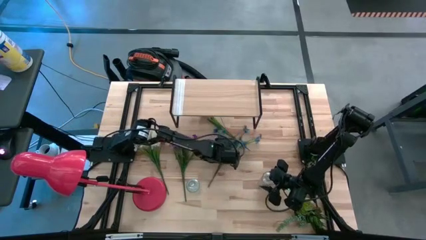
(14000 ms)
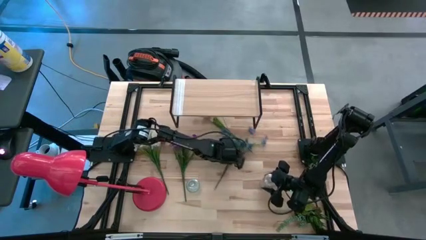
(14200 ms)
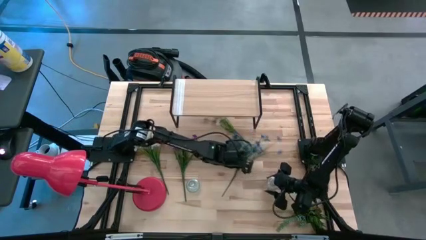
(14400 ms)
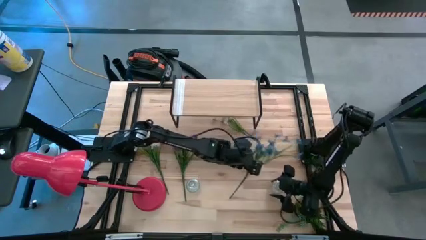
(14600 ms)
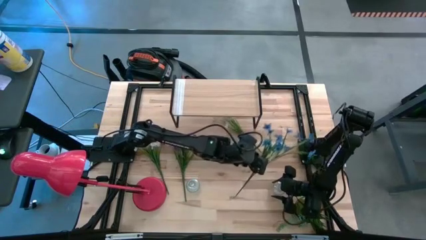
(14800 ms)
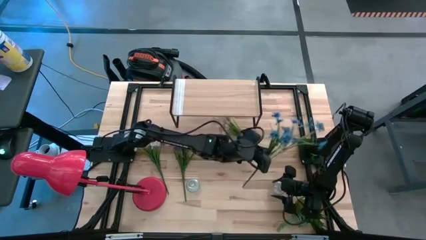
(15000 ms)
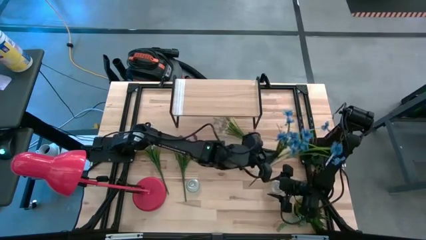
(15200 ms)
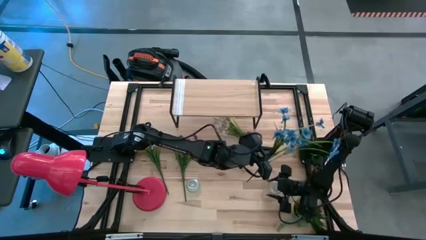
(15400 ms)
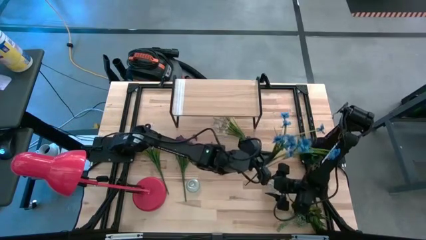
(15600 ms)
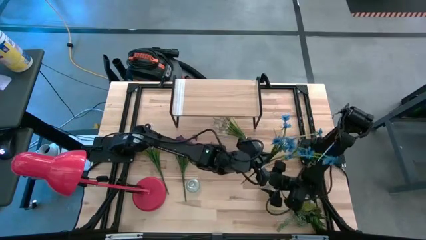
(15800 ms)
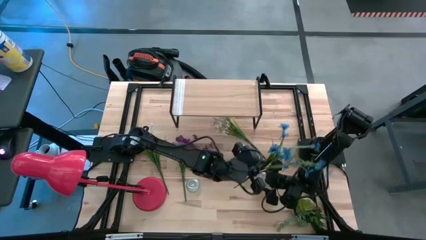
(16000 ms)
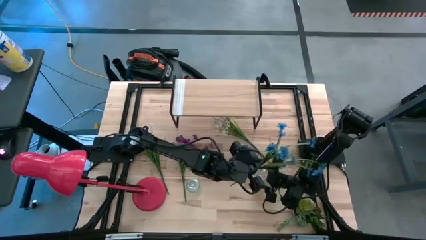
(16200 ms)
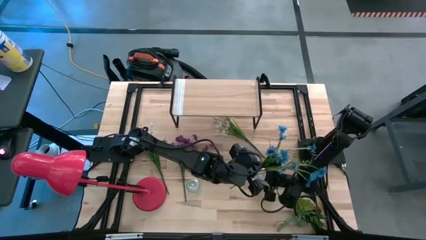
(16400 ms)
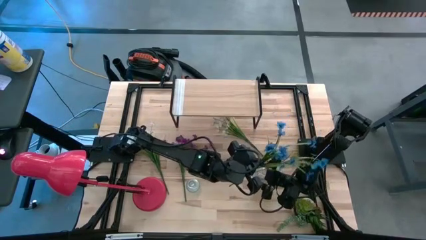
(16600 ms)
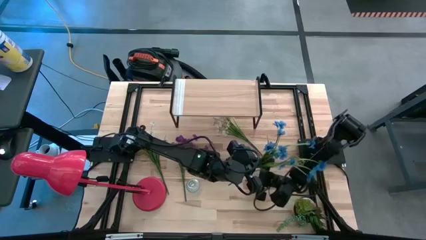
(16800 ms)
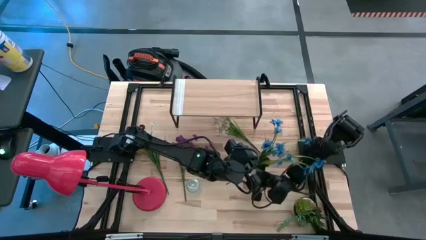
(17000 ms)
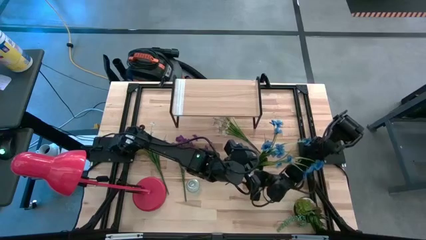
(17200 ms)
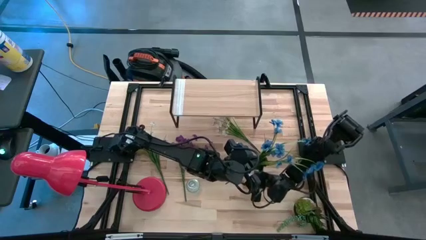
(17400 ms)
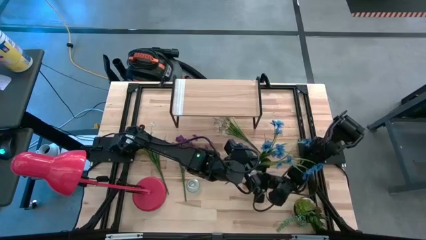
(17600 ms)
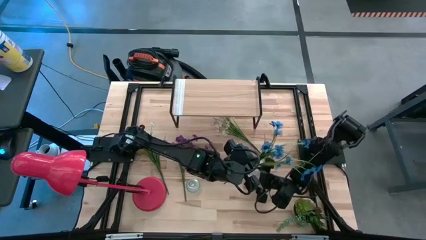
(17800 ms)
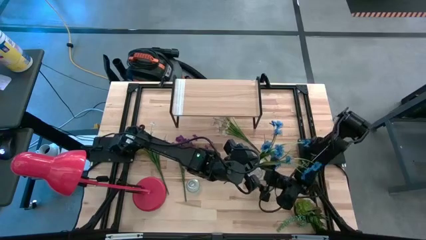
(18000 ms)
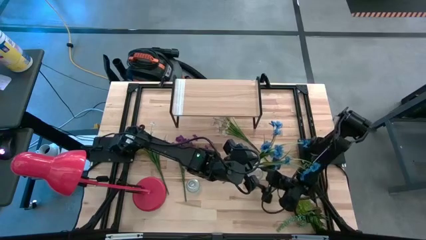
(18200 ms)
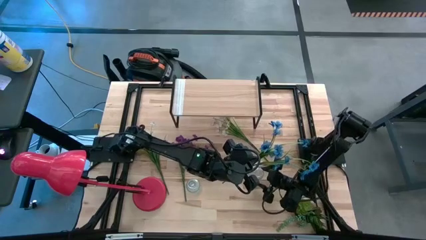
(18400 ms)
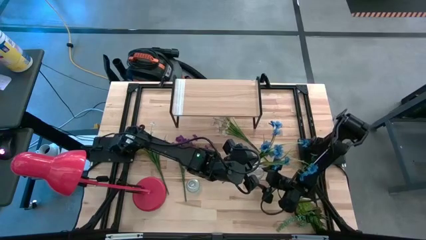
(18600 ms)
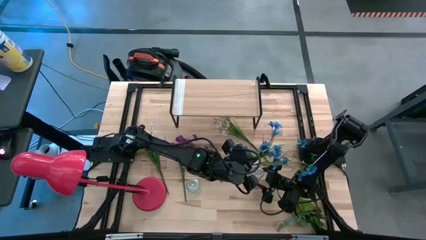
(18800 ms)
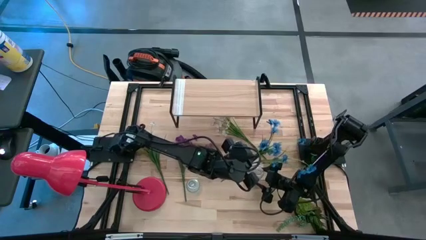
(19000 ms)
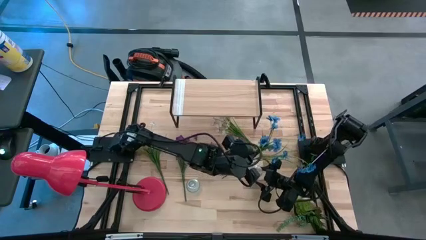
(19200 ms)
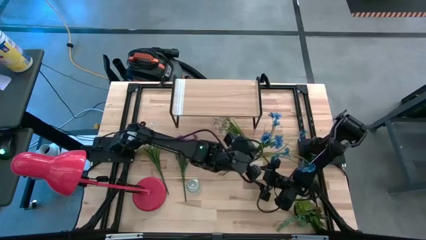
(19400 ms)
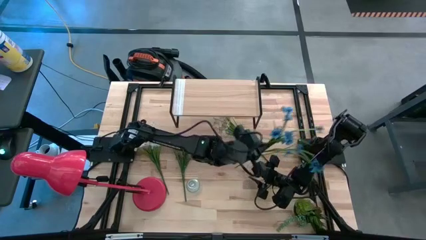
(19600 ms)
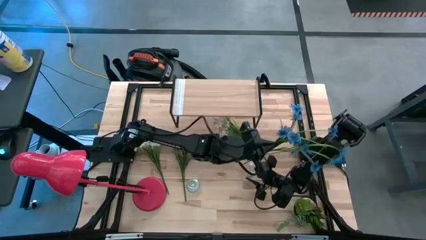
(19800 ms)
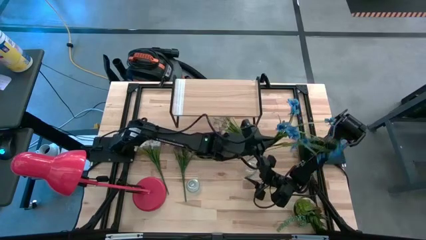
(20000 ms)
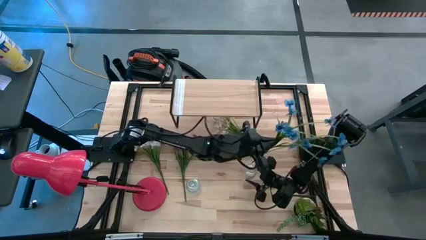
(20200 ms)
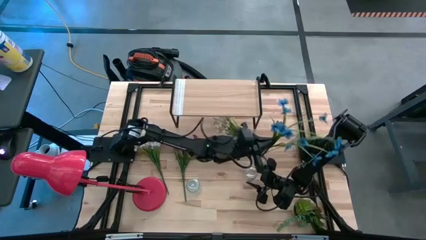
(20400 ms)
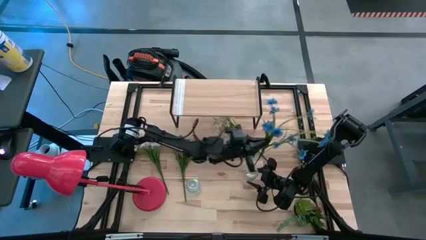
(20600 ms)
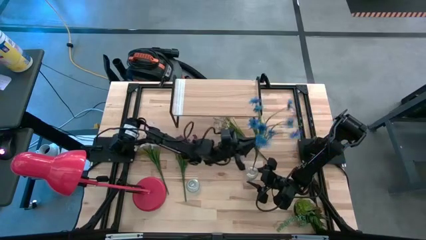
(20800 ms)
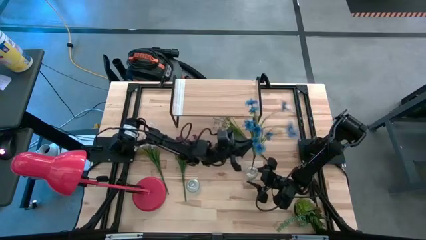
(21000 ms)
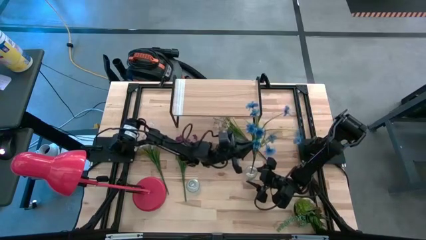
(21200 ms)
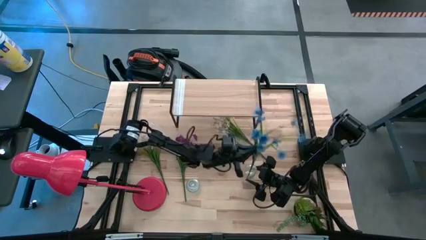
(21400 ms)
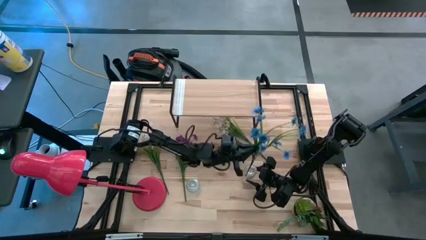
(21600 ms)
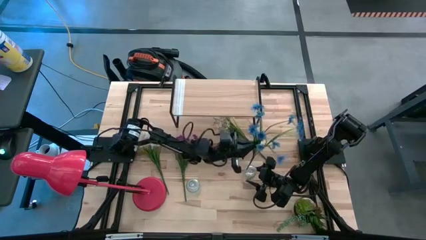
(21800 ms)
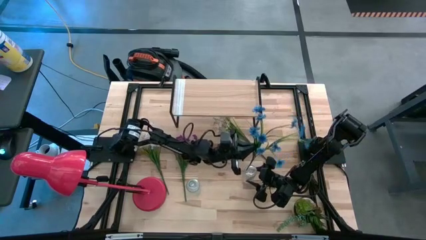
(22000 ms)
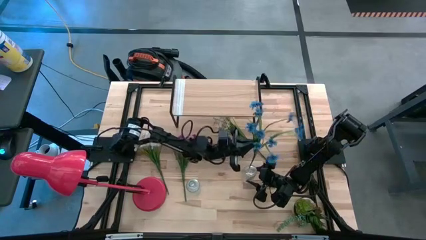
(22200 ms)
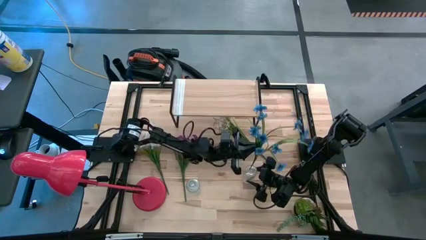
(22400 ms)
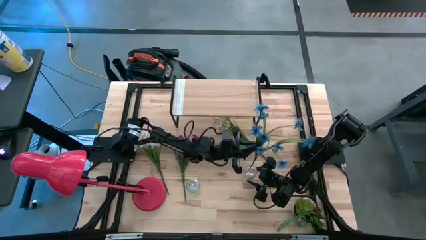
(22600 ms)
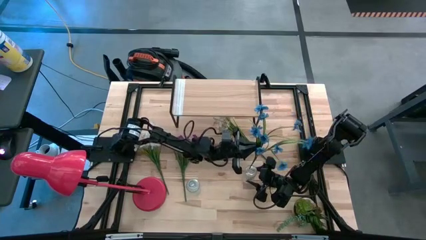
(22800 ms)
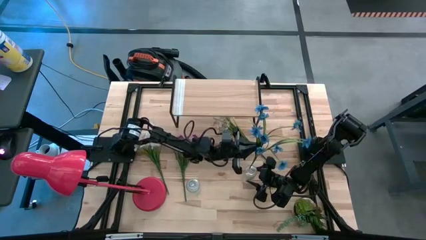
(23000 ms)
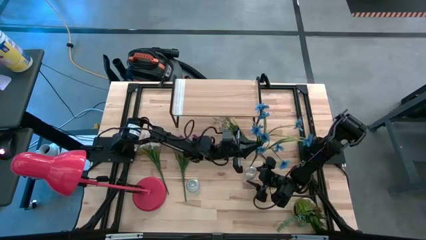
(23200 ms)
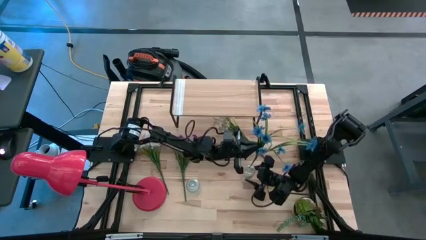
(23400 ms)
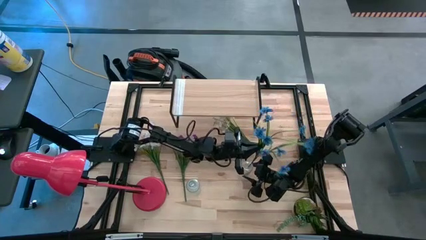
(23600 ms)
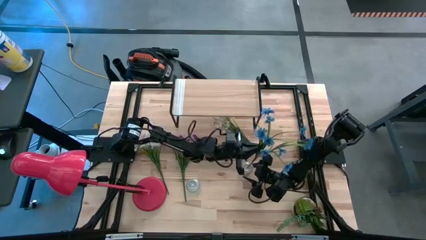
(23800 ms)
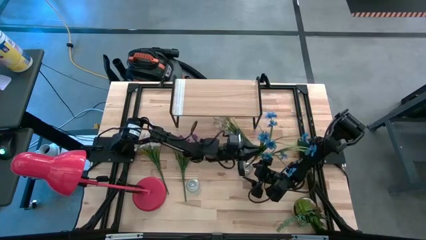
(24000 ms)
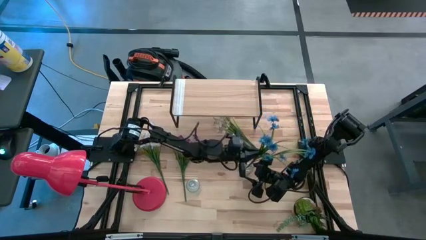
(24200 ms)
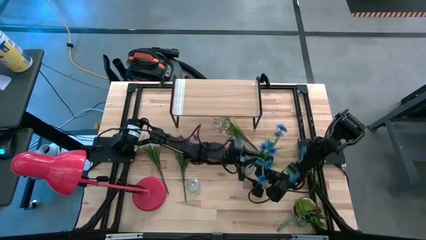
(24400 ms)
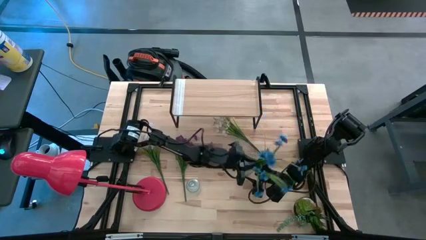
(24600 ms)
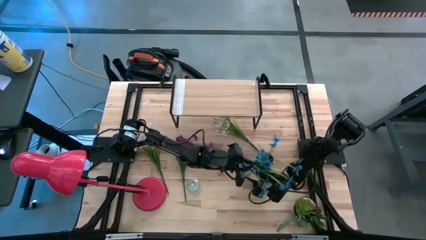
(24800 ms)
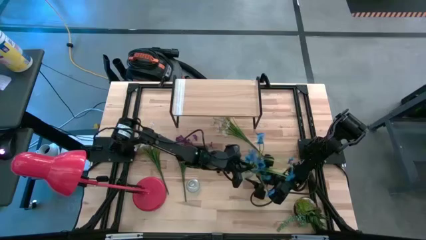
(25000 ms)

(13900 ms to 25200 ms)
Task: Pick and place flowers into a vace then onto a shelf
Put the blue flowers into the right transparent vase
